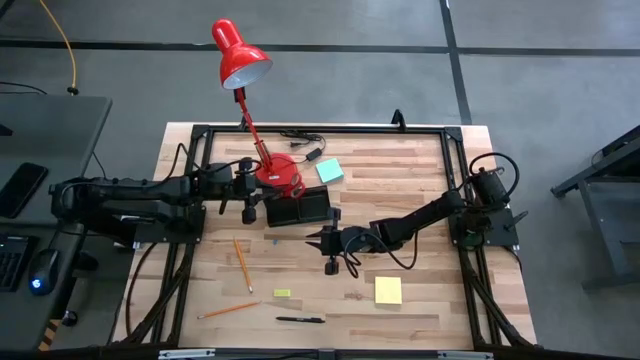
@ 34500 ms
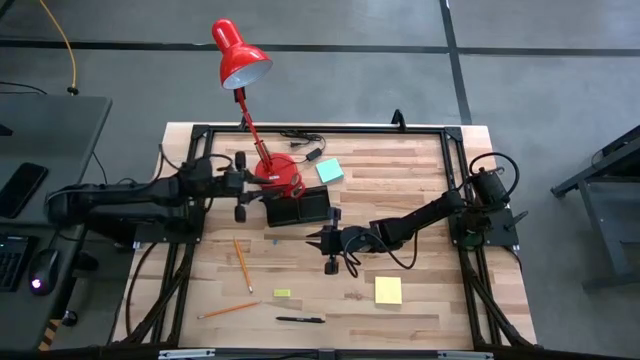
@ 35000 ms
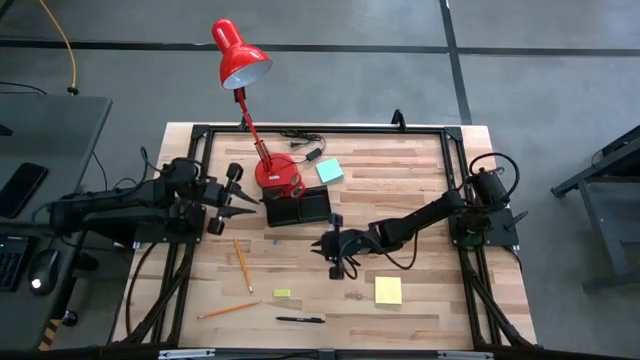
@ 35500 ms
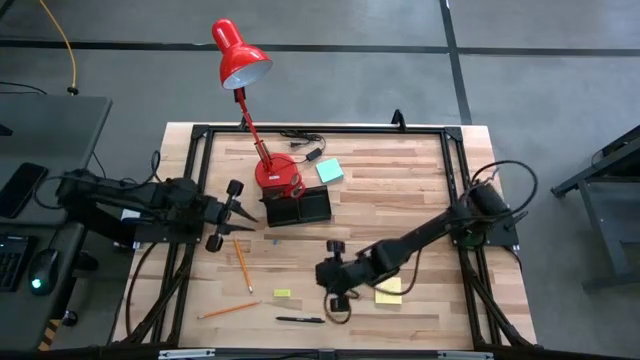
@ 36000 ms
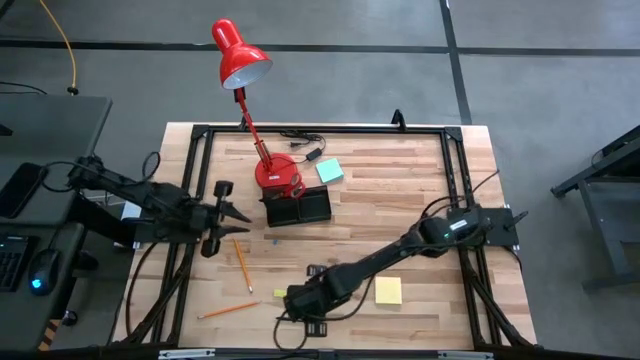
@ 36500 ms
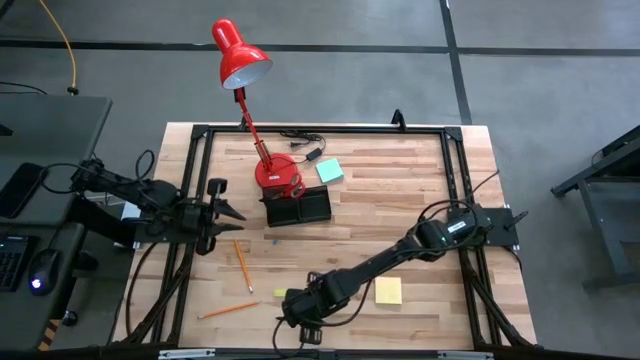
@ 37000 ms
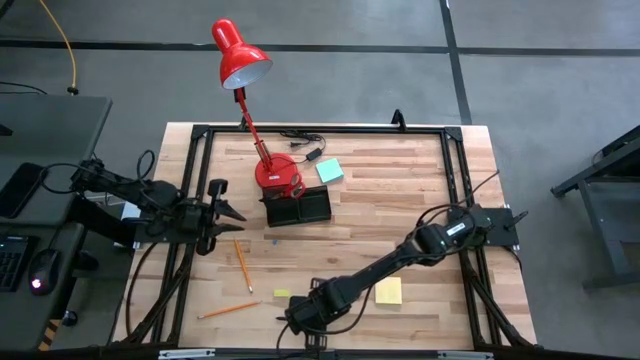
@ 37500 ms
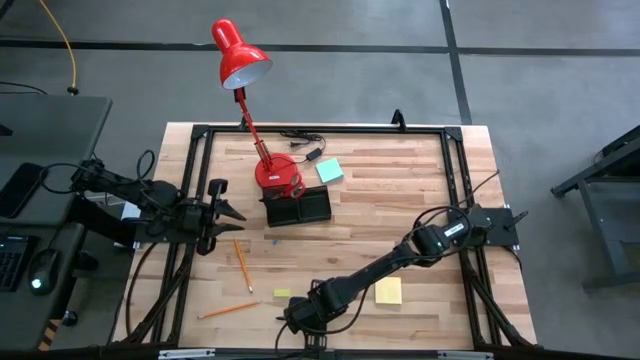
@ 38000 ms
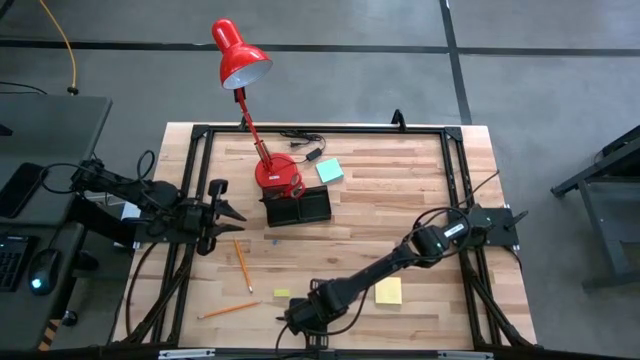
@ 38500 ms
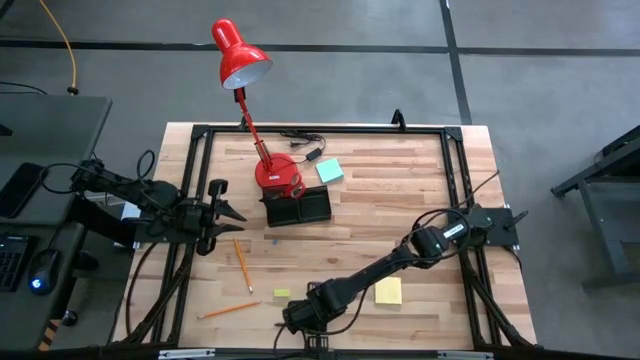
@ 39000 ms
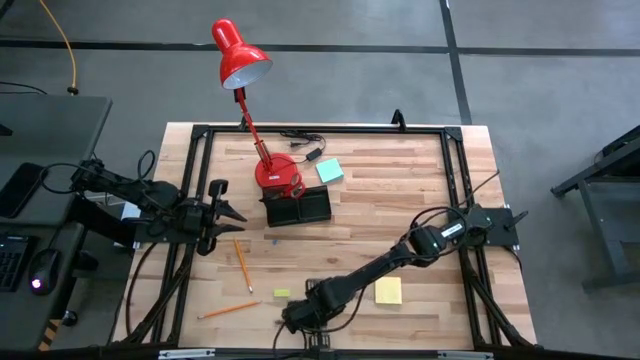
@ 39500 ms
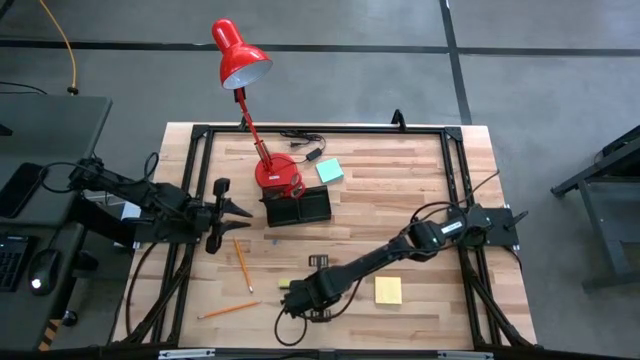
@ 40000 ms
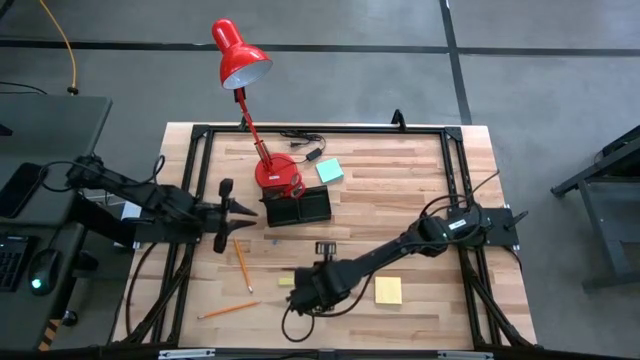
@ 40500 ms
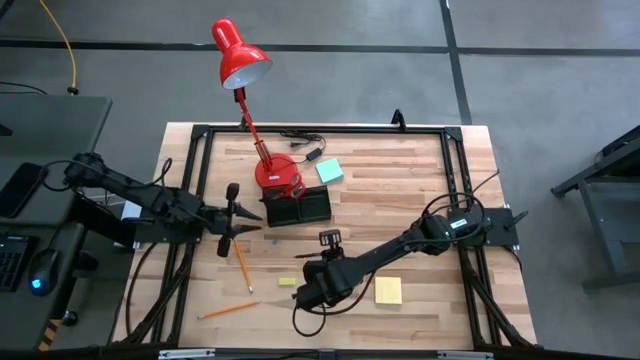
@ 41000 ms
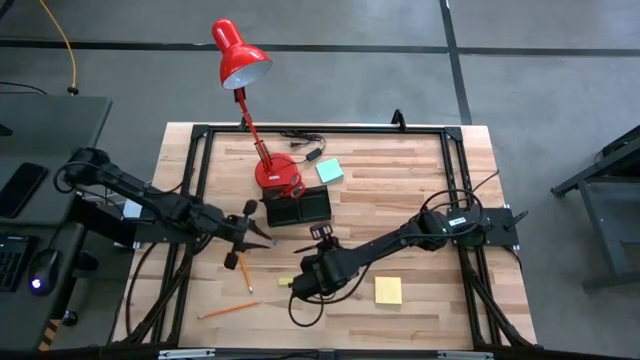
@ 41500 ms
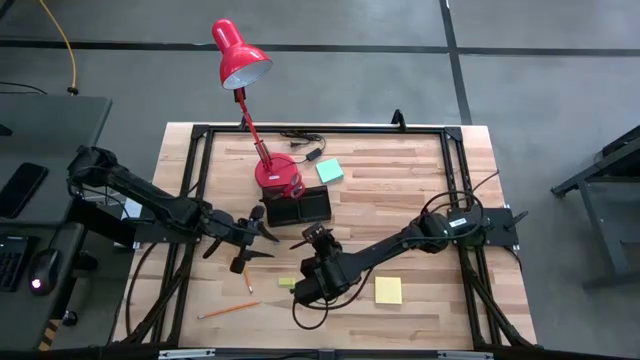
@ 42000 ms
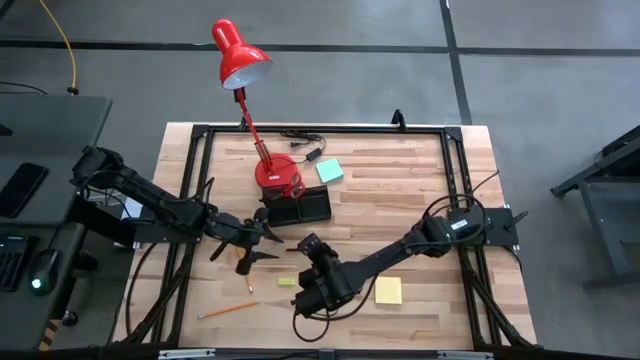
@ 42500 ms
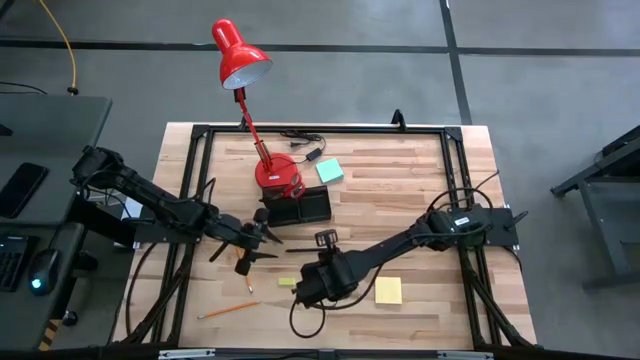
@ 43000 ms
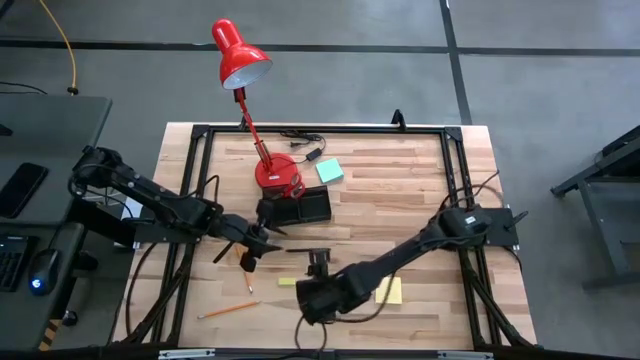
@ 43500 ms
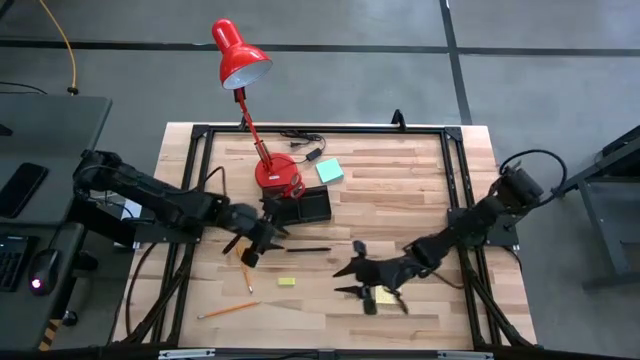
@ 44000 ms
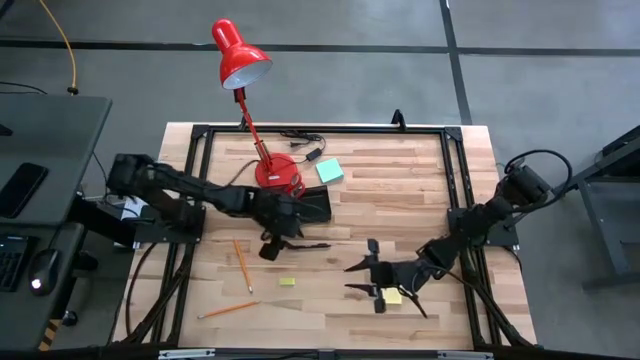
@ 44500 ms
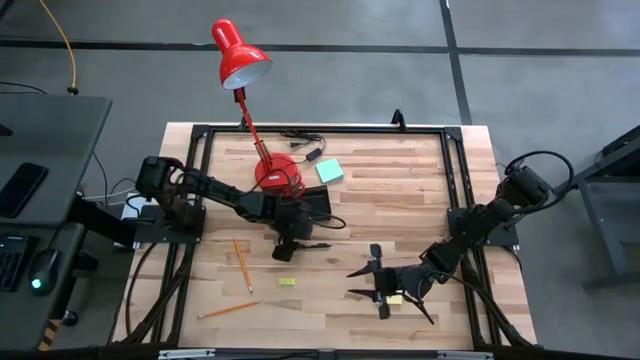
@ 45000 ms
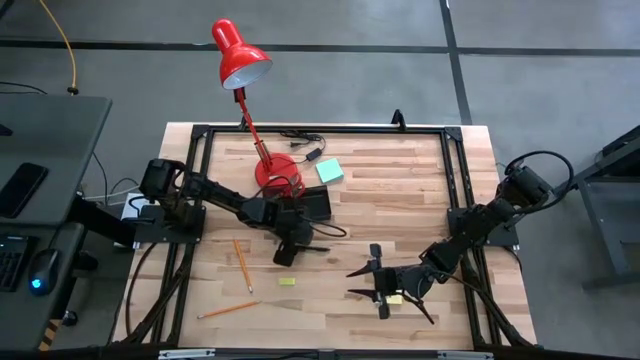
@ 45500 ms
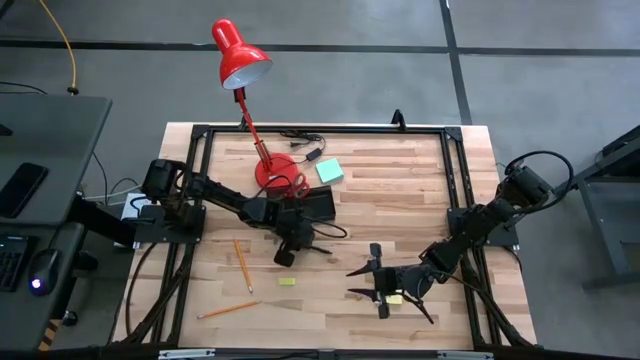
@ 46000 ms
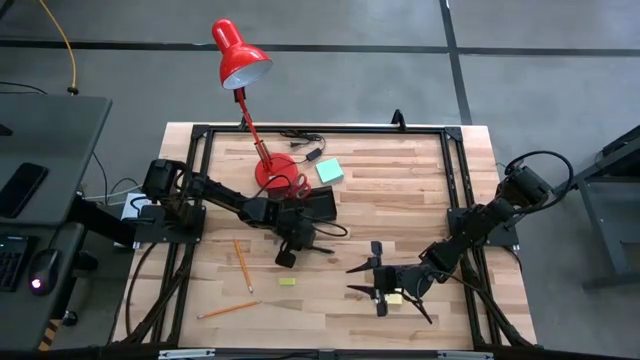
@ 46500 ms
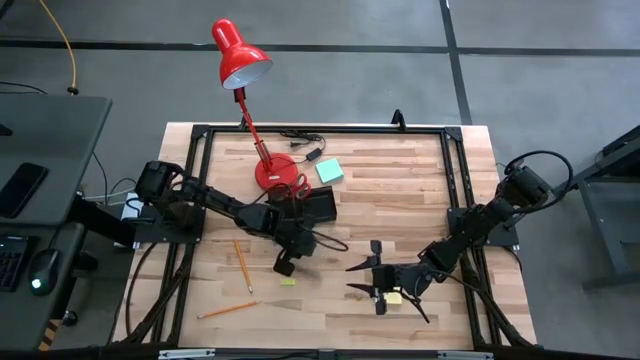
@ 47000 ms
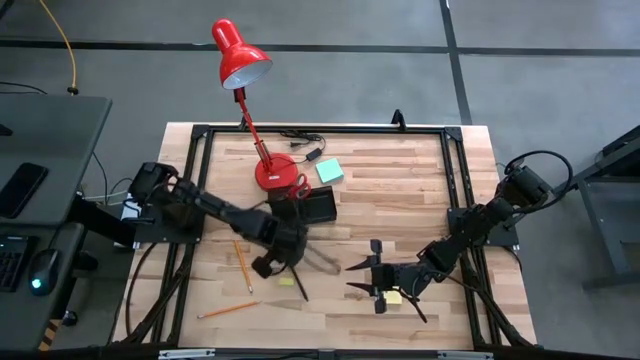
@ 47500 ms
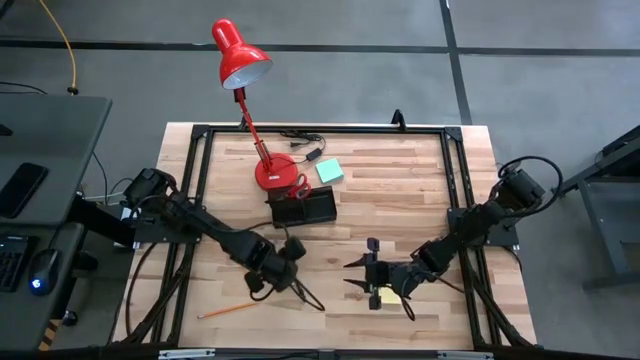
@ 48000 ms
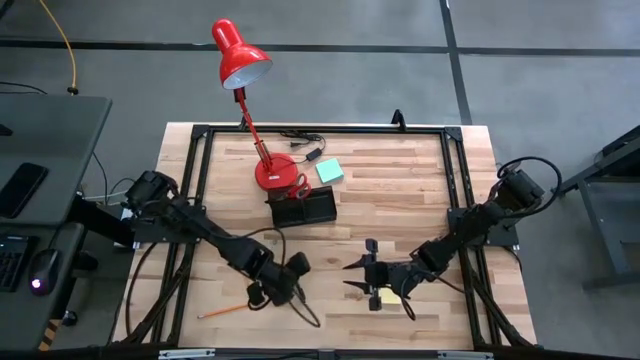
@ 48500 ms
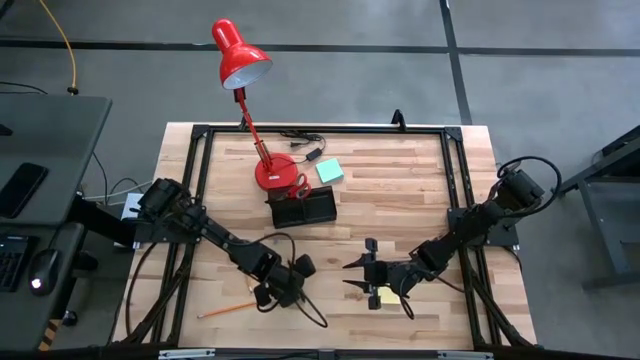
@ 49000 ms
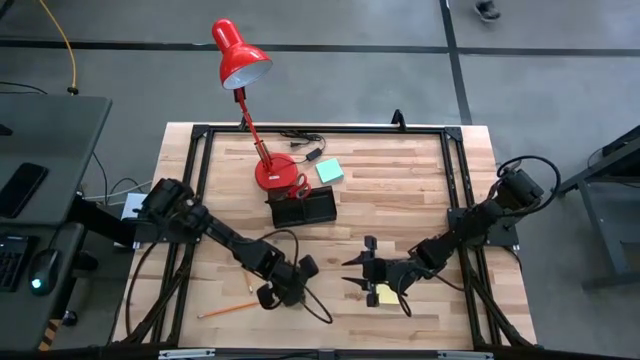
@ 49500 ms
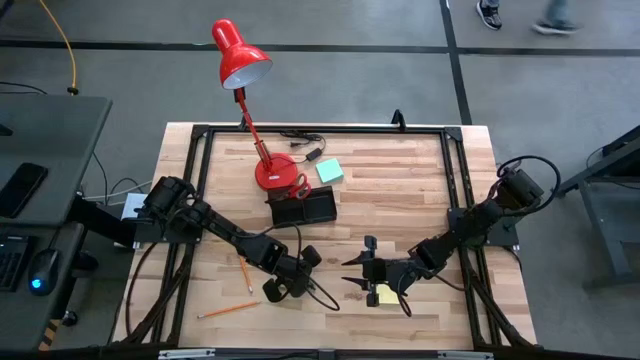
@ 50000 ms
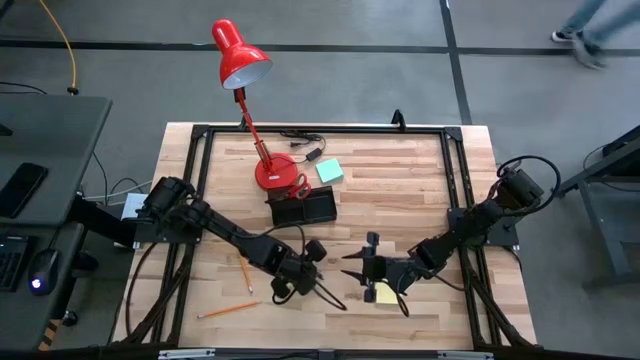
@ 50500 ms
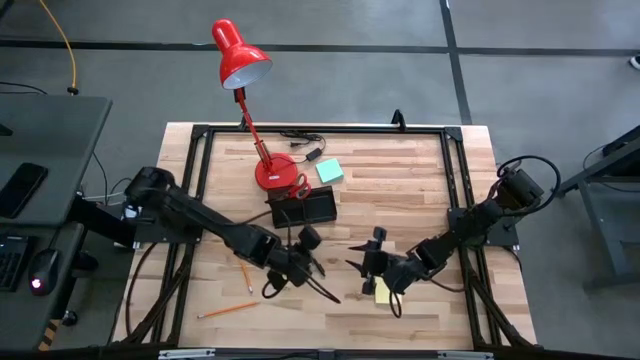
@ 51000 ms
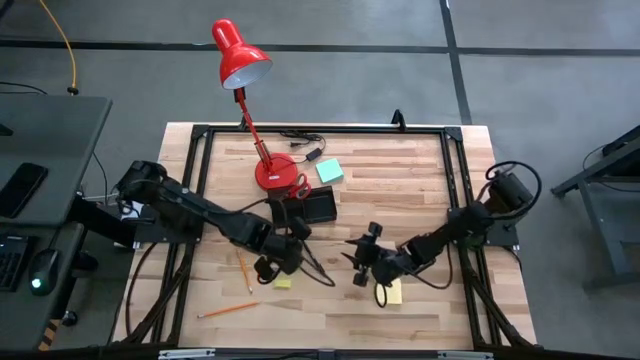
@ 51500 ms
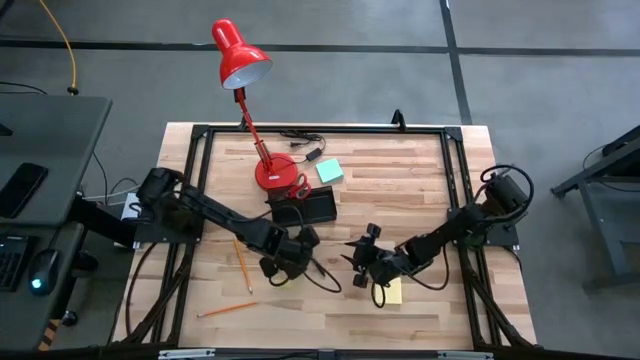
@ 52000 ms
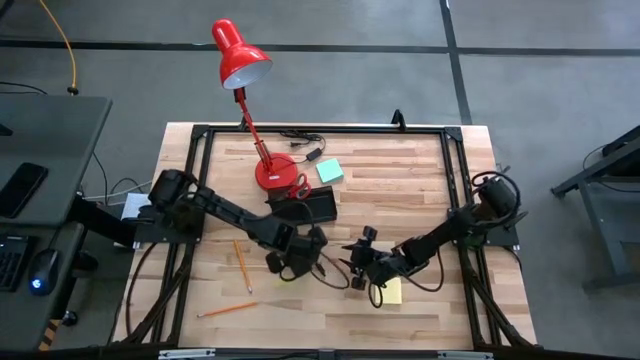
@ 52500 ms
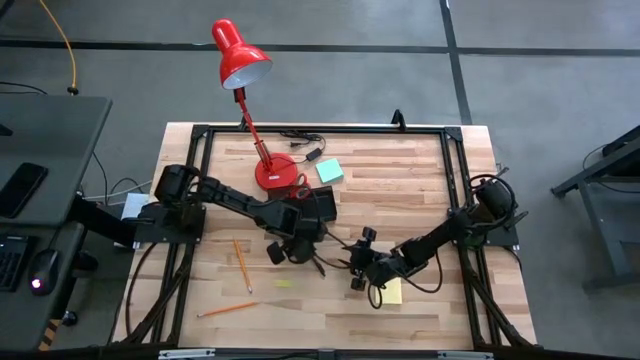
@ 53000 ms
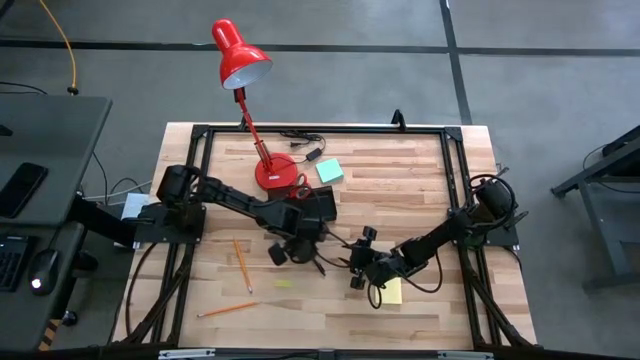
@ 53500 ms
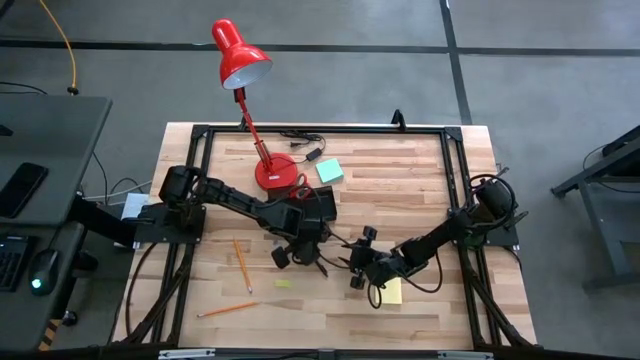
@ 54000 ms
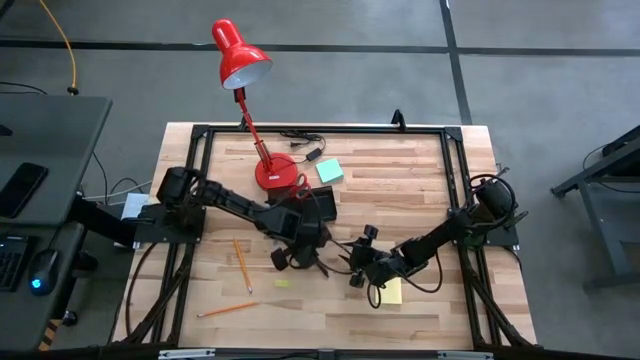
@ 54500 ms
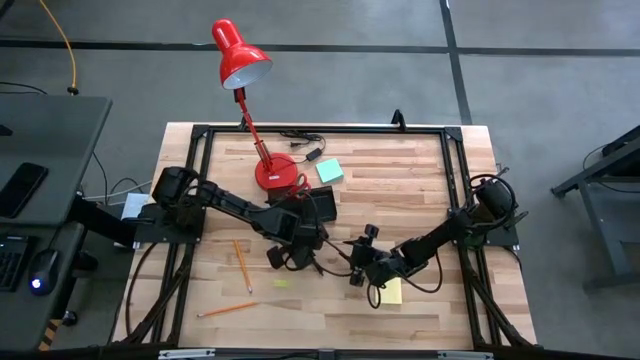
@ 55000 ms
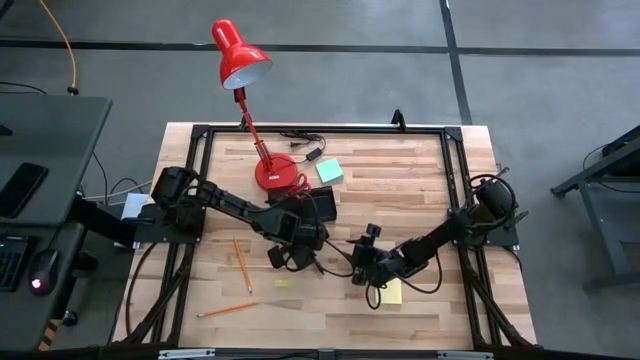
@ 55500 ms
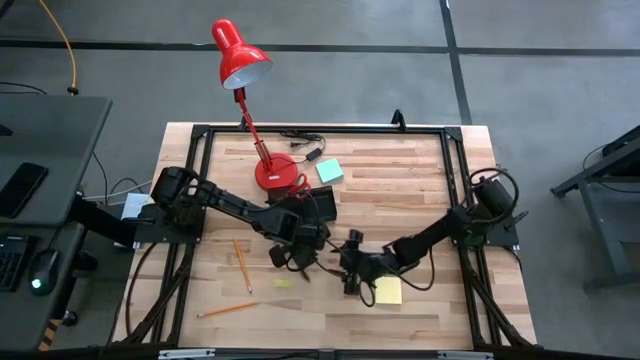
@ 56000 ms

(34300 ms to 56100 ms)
Task: Pick and place office supplies into organizer
Put the black pen into the desk organizer
